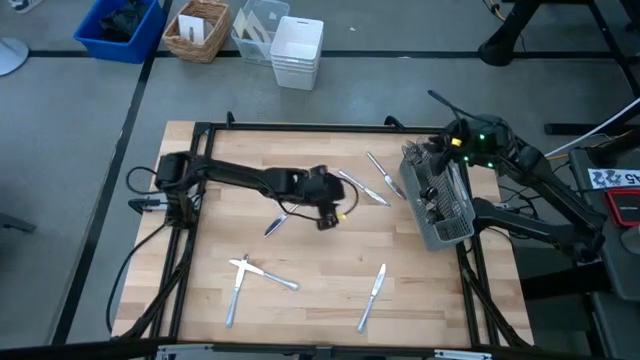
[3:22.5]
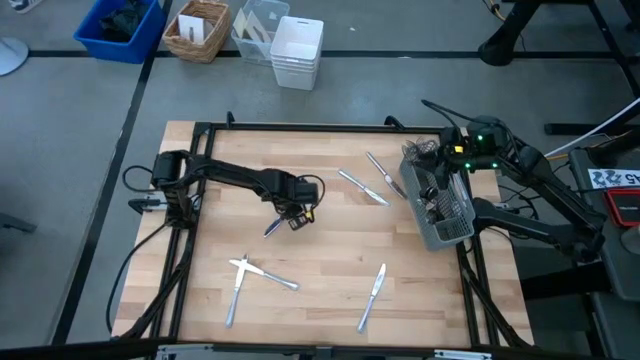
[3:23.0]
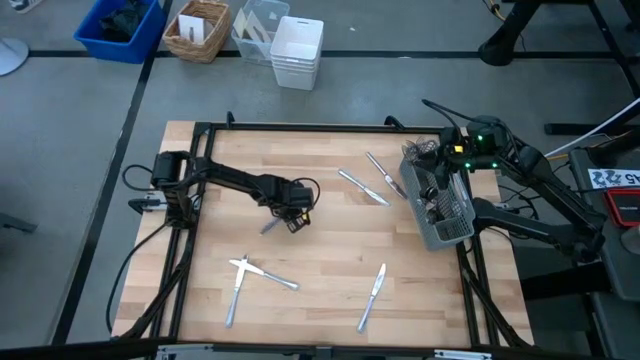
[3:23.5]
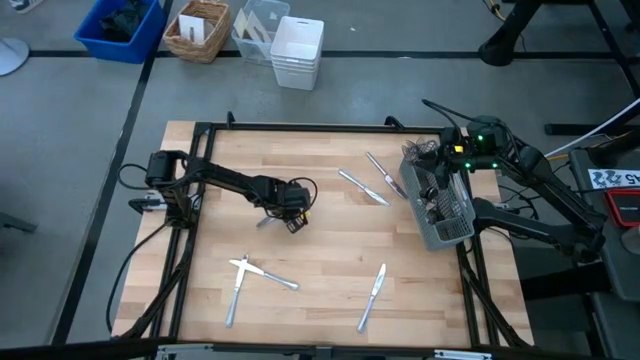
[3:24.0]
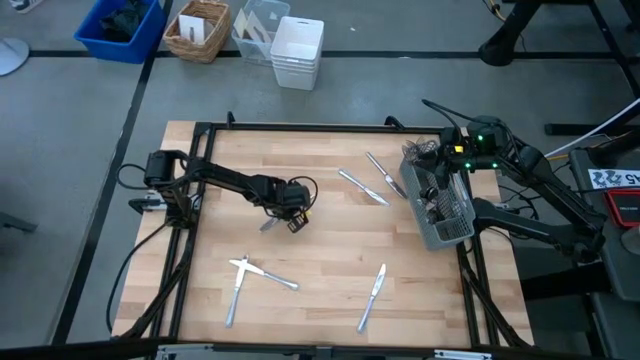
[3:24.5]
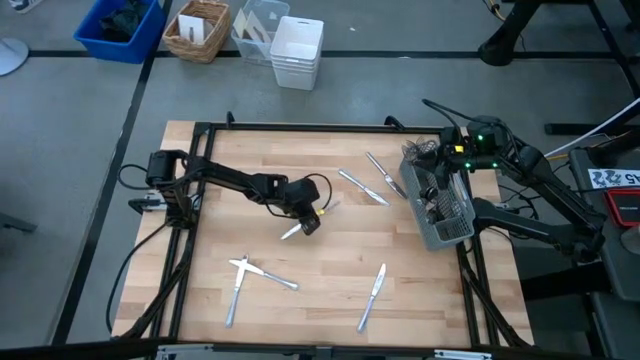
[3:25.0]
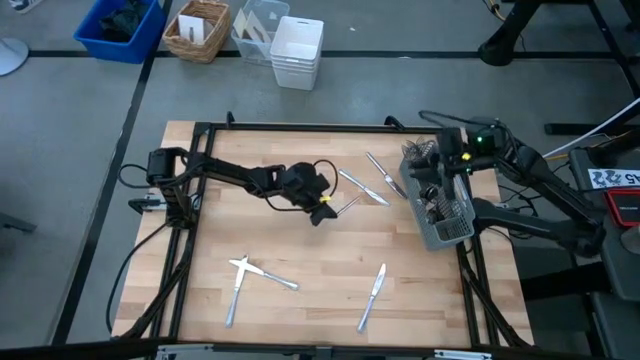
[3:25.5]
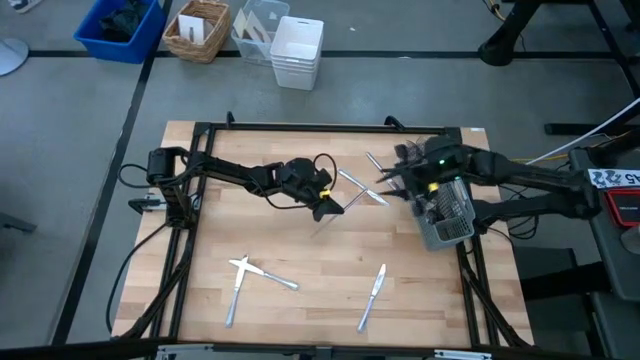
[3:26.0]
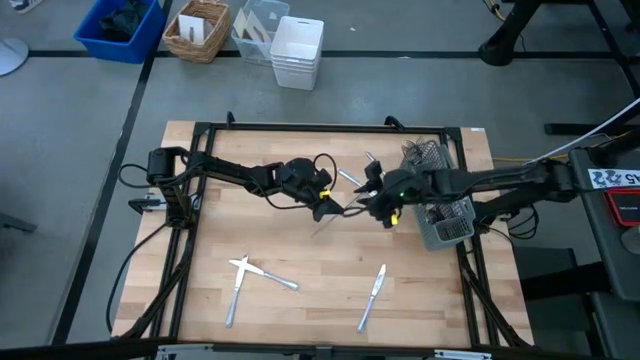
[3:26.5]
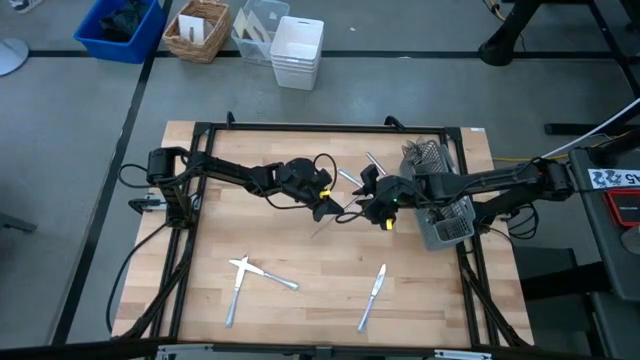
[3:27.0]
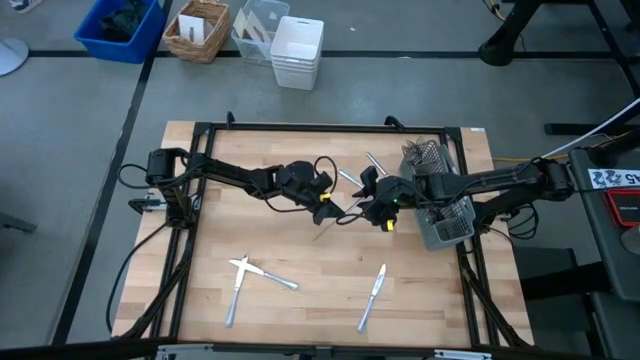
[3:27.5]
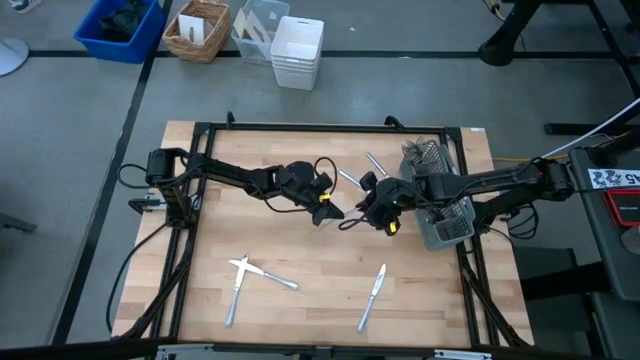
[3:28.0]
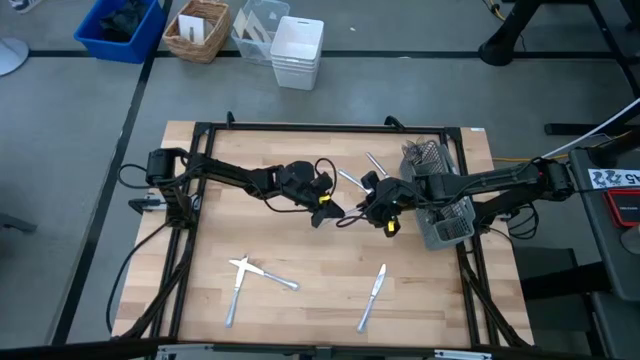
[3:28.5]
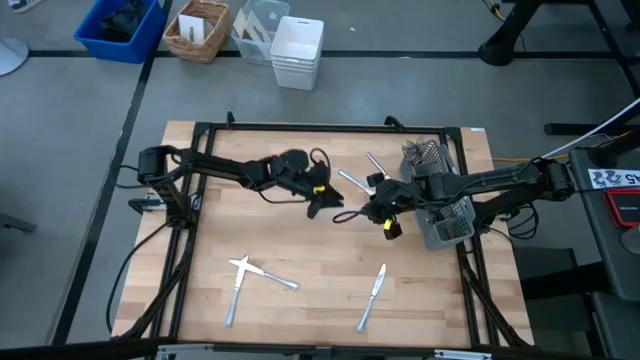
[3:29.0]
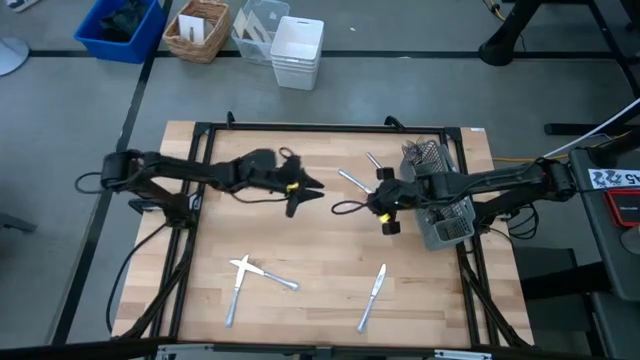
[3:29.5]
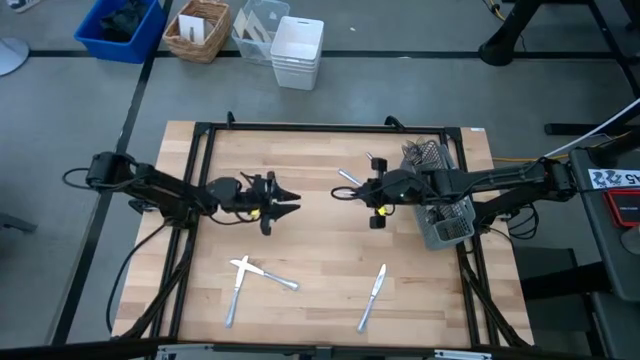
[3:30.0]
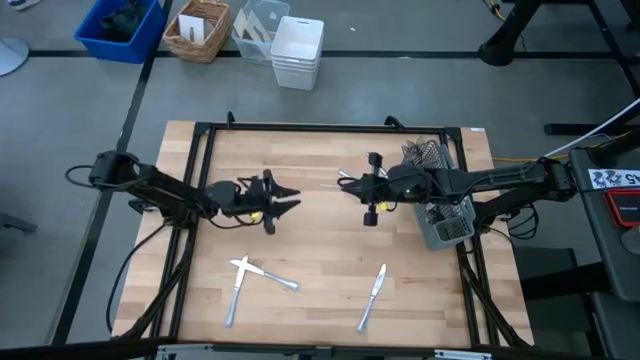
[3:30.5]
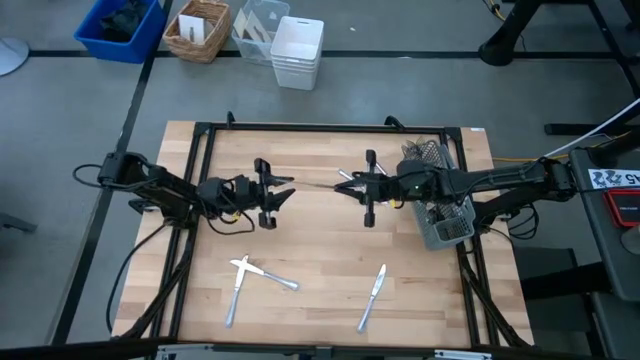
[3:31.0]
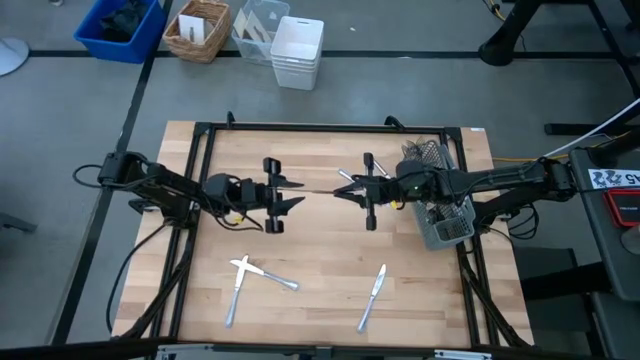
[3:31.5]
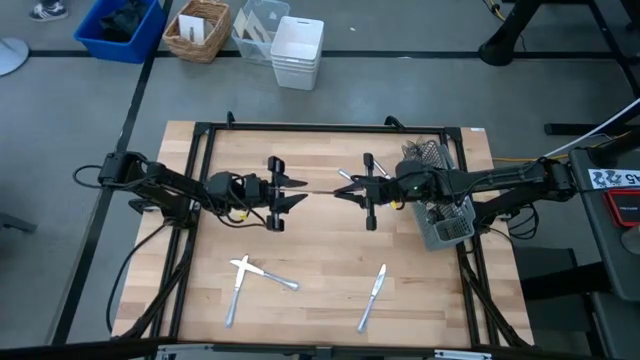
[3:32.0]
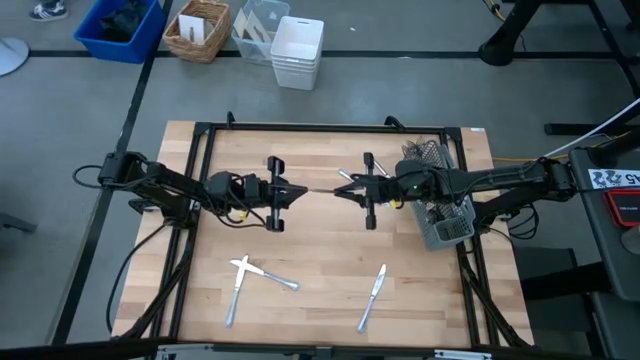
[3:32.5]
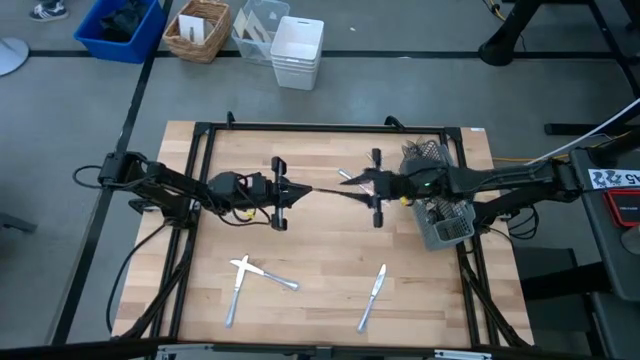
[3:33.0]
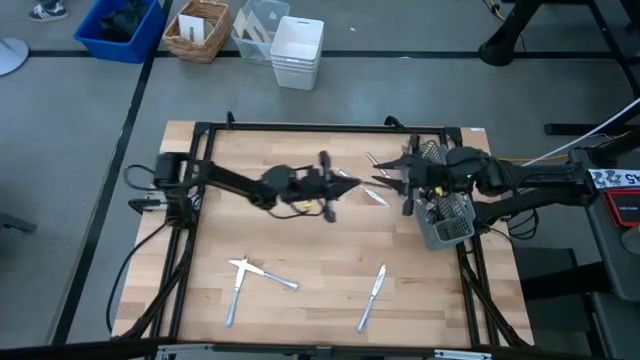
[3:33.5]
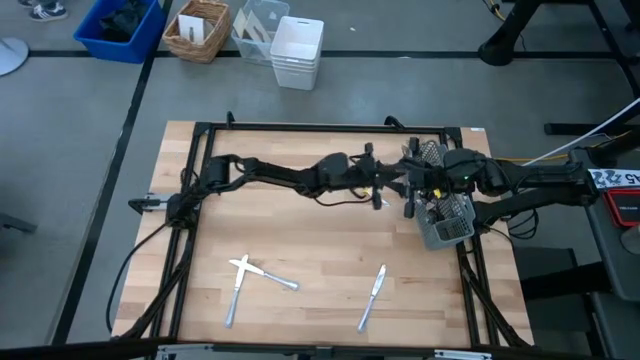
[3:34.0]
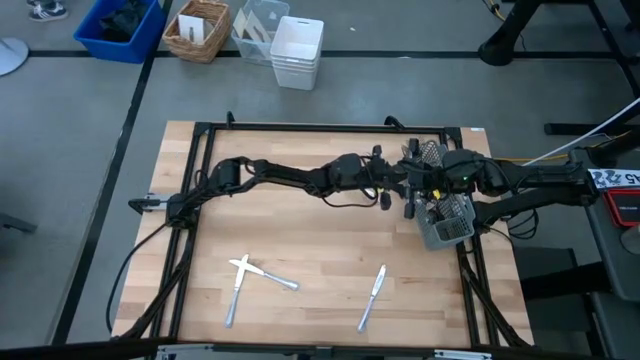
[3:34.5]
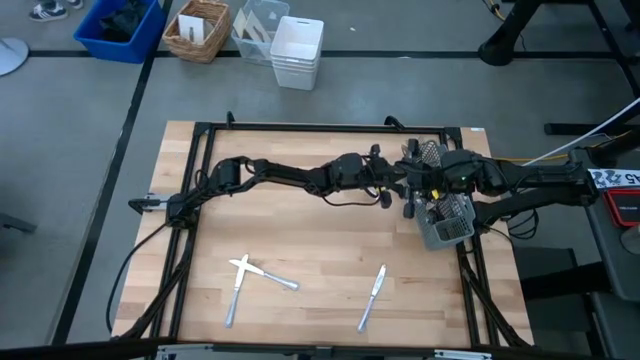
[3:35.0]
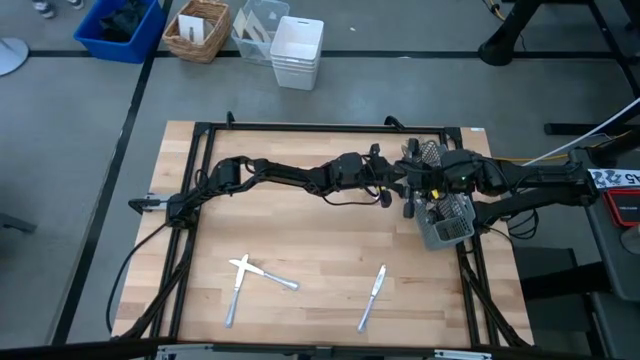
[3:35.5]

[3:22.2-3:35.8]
Task: Sort silverware
Put the knife into the middle section of the utensil holder

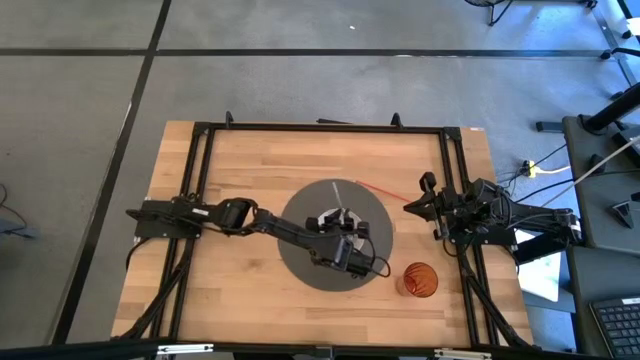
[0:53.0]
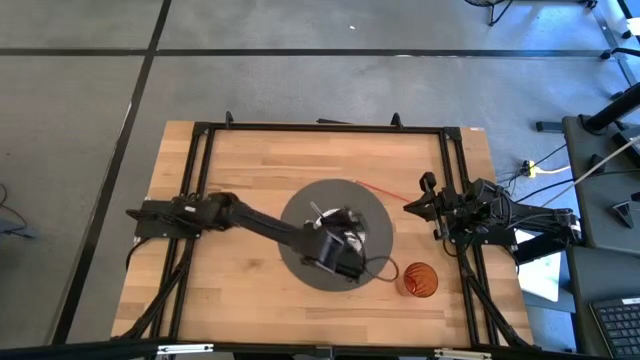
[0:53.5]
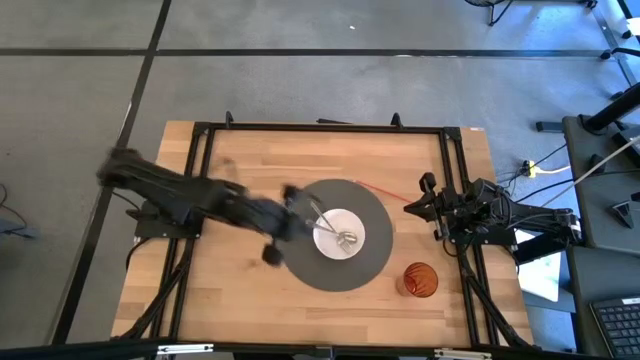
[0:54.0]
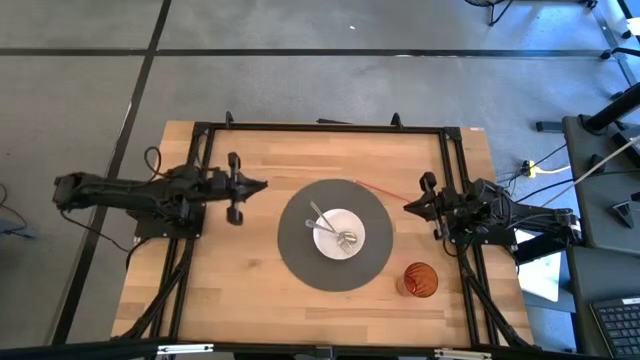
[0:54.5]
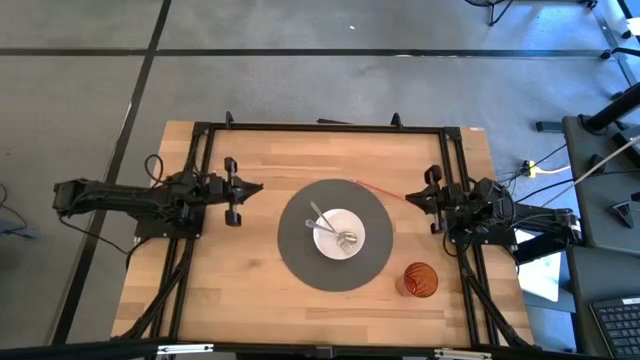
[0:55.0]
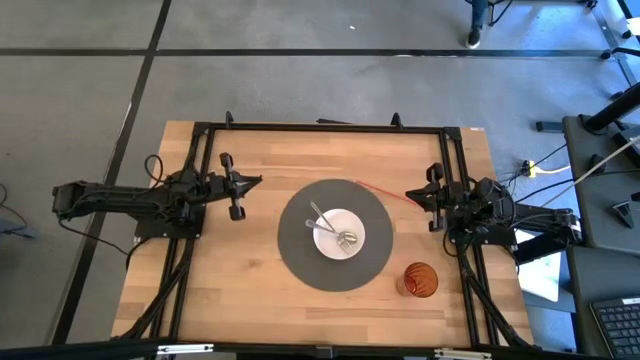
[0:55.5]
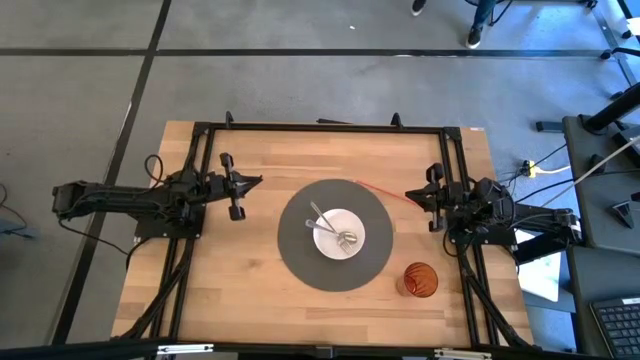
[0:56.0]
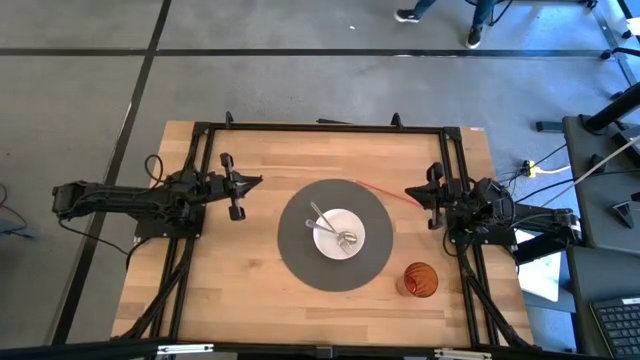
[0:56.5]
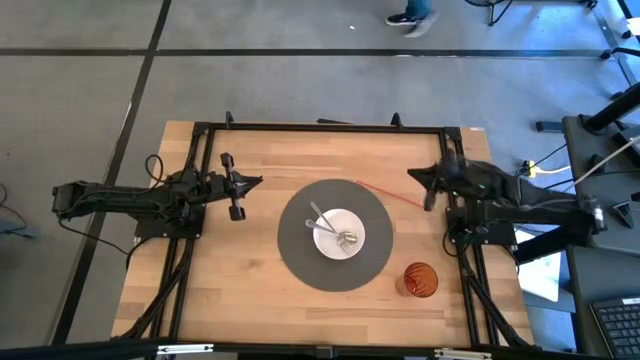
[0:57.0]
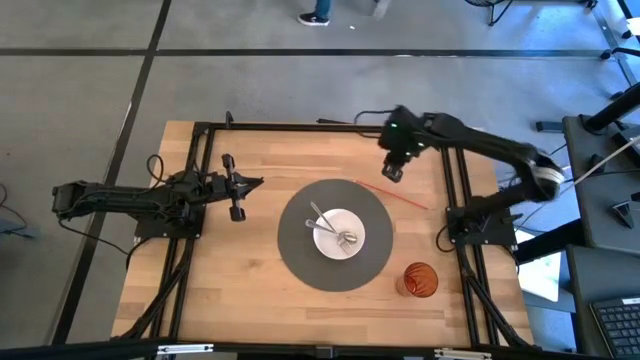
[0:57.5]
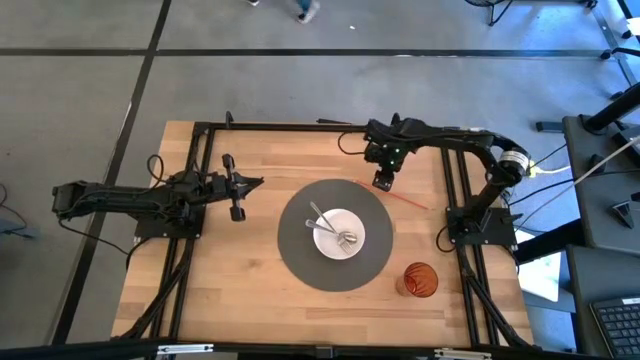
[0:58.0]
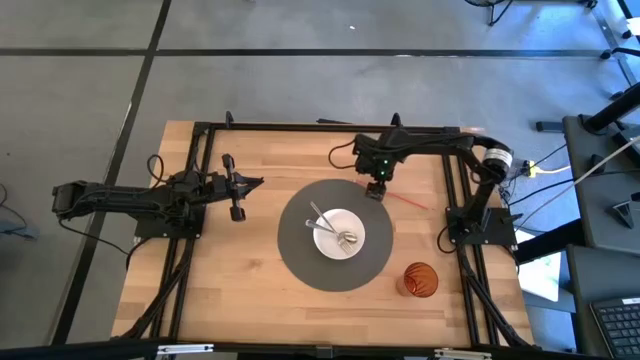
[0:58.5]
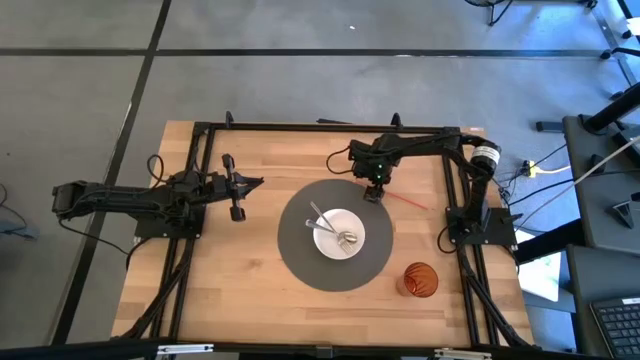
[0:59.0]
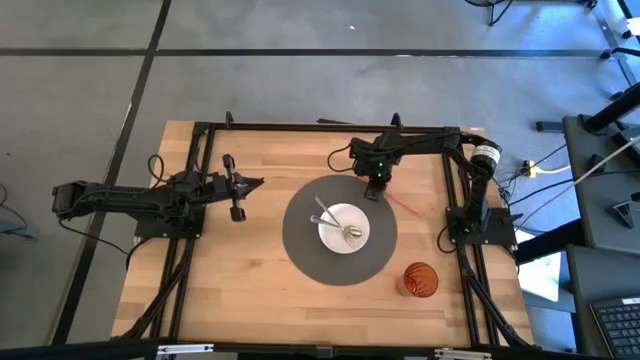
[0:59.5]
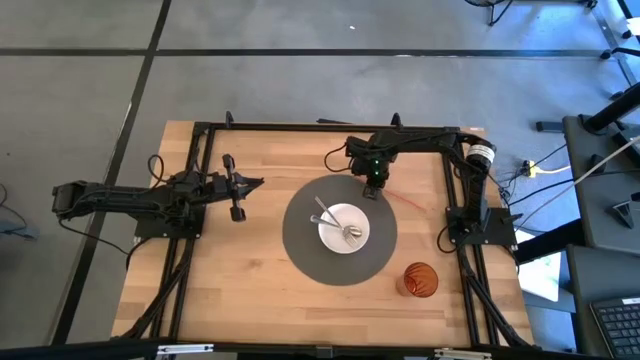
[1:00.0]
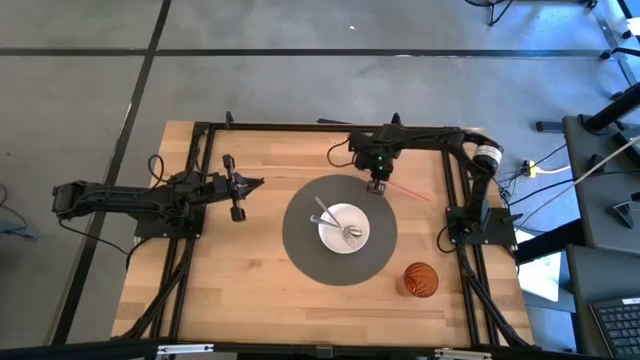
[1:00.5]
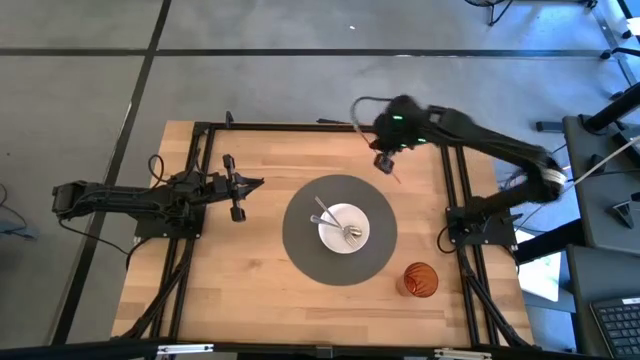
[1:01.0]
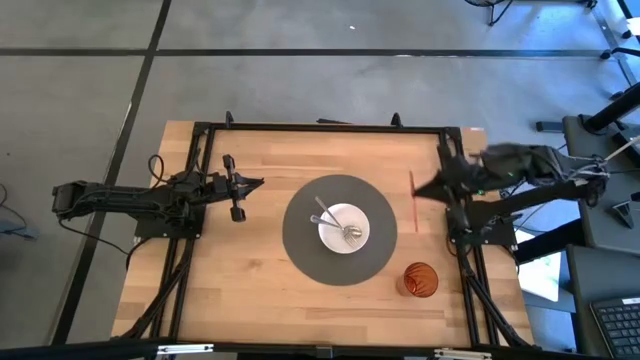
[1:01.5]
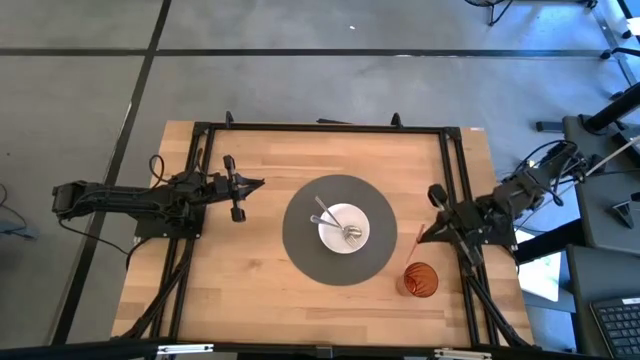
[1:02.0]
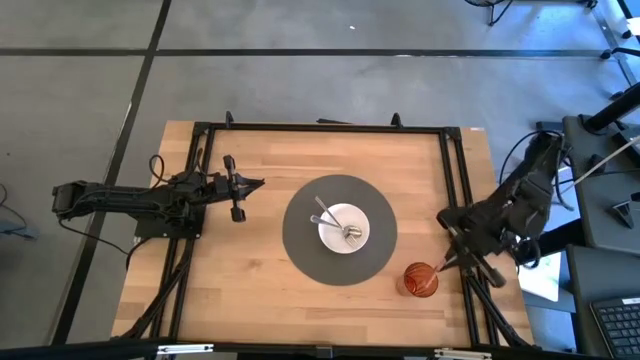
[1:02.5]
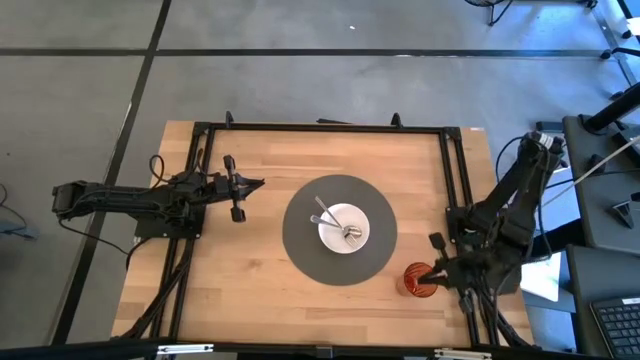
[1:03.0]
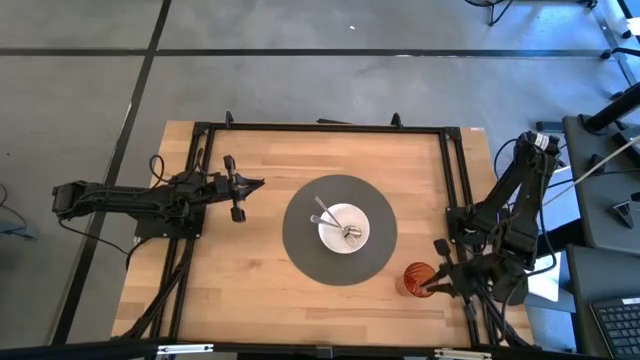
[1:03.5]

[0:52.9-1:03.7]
Task: Pick & Place Utensil
Put the orange straw into the orange cup
